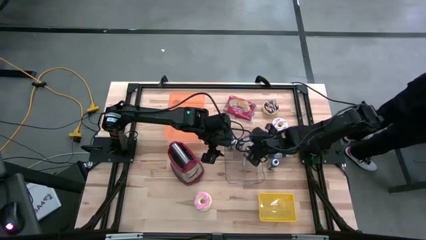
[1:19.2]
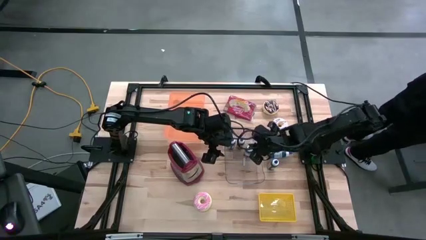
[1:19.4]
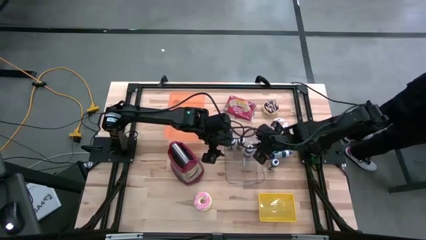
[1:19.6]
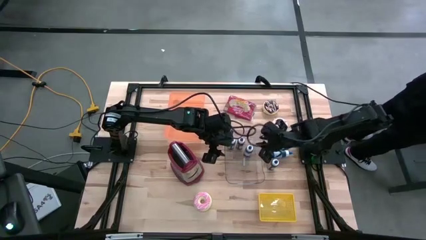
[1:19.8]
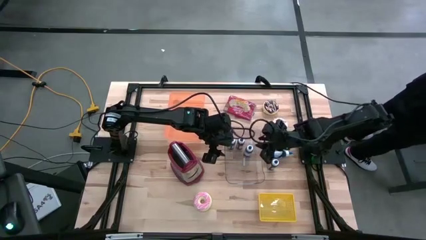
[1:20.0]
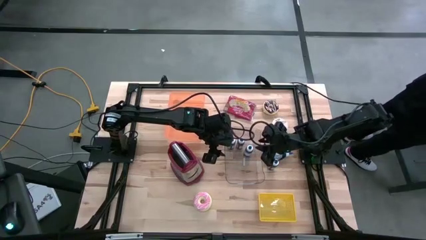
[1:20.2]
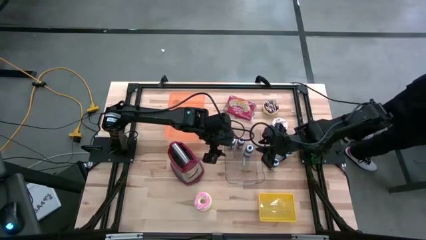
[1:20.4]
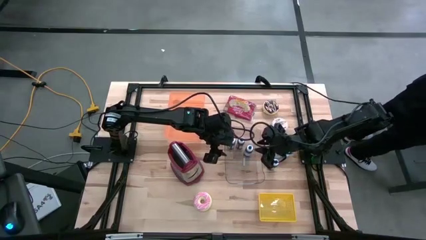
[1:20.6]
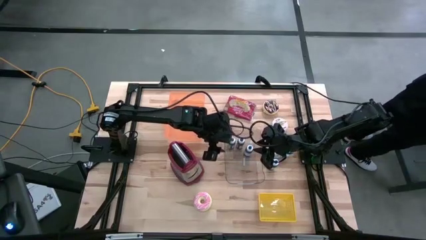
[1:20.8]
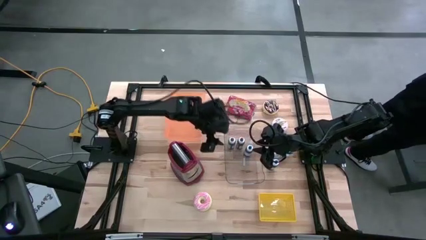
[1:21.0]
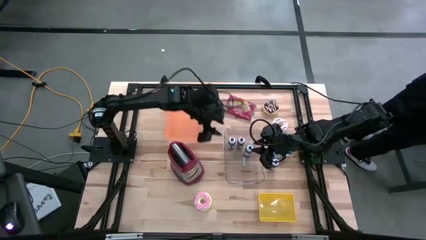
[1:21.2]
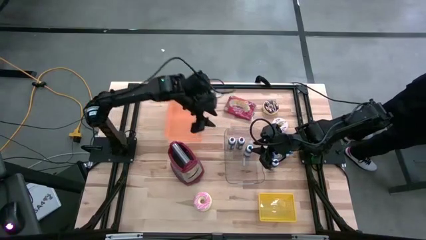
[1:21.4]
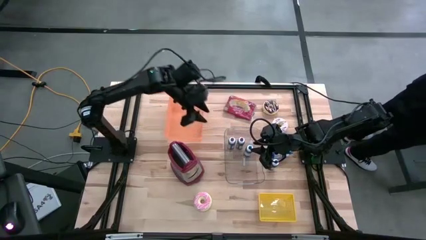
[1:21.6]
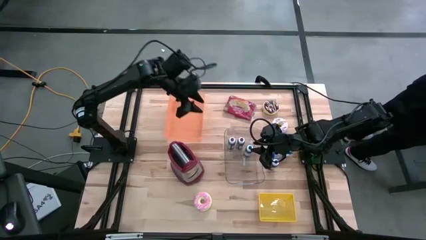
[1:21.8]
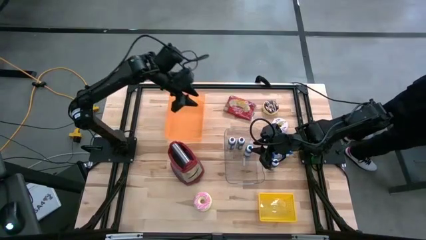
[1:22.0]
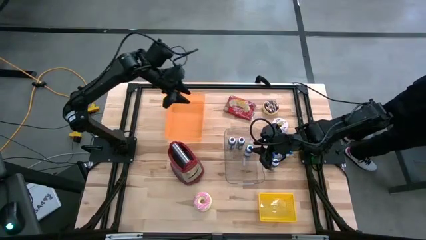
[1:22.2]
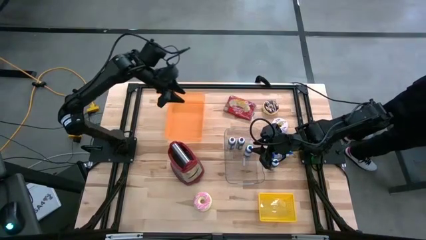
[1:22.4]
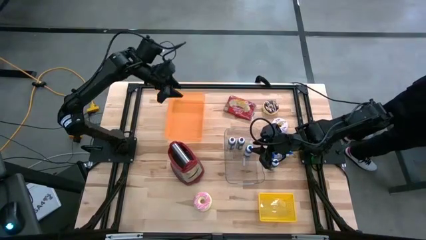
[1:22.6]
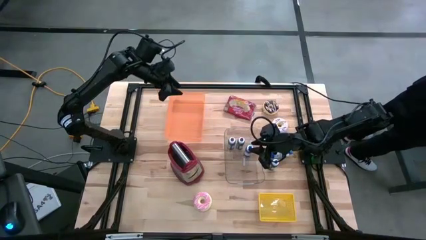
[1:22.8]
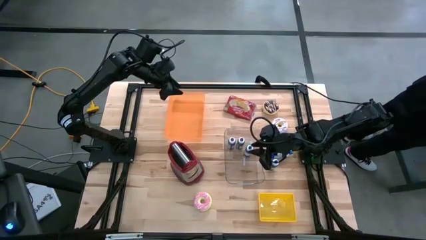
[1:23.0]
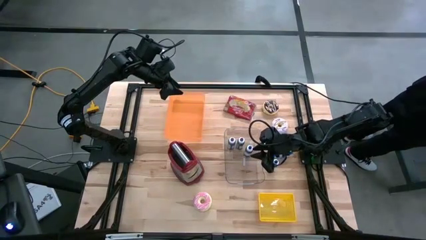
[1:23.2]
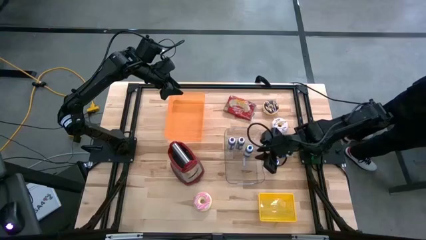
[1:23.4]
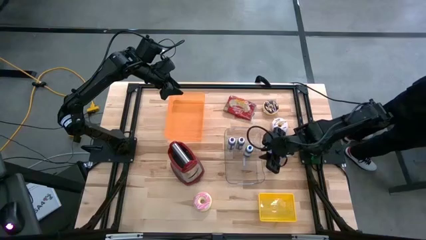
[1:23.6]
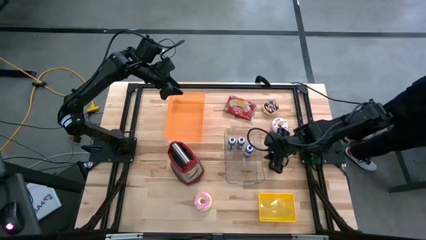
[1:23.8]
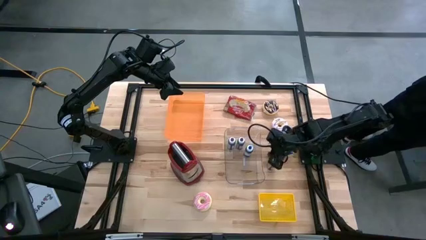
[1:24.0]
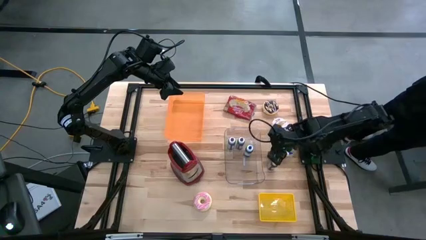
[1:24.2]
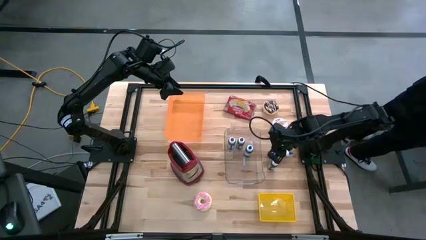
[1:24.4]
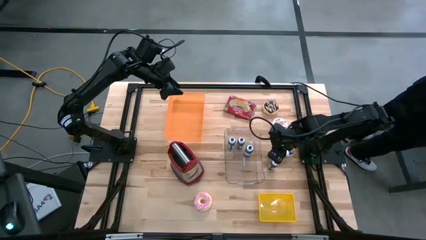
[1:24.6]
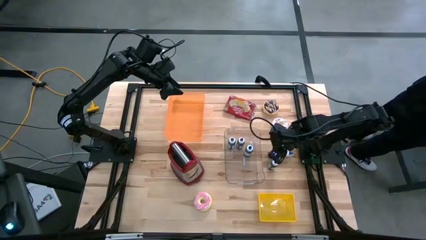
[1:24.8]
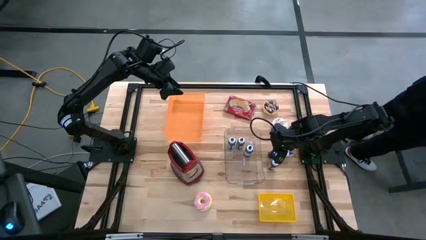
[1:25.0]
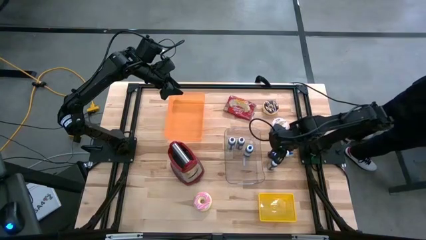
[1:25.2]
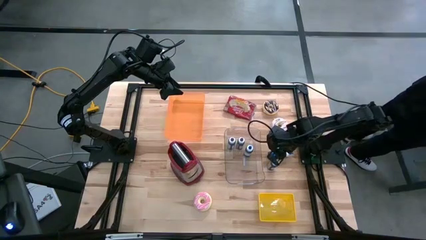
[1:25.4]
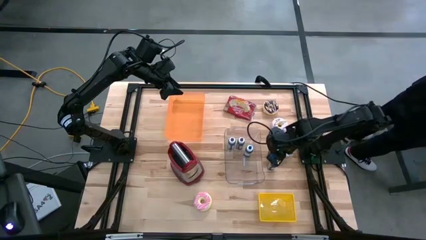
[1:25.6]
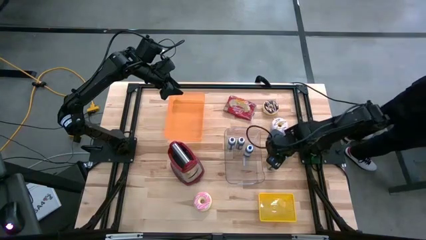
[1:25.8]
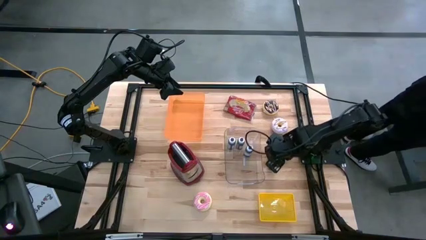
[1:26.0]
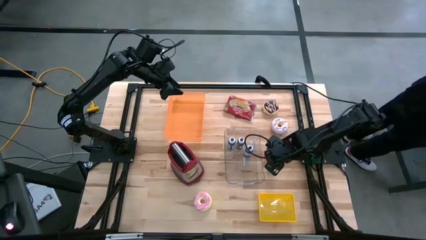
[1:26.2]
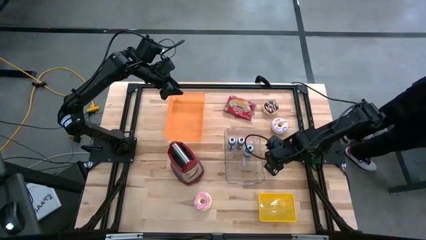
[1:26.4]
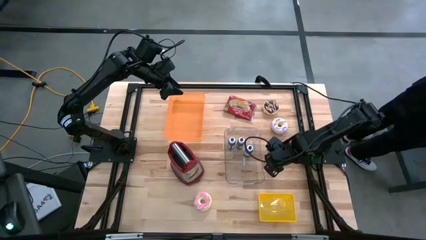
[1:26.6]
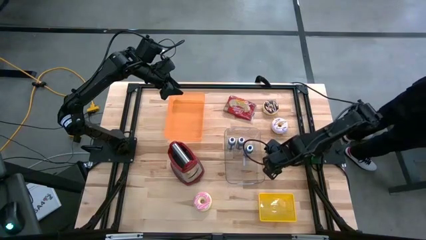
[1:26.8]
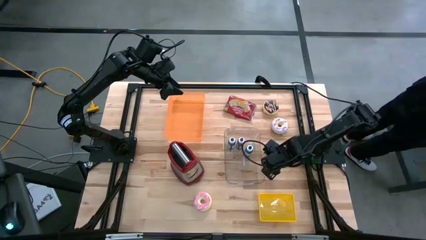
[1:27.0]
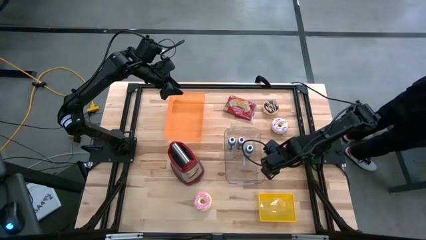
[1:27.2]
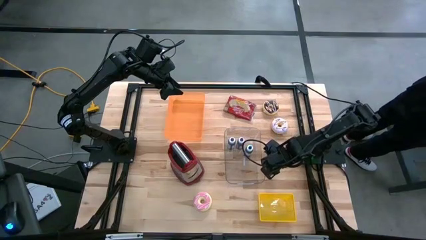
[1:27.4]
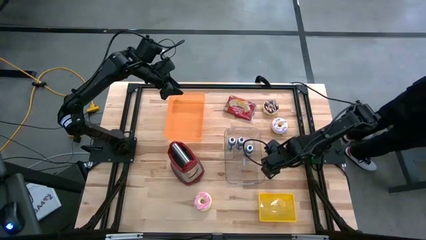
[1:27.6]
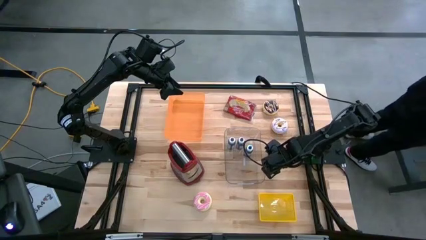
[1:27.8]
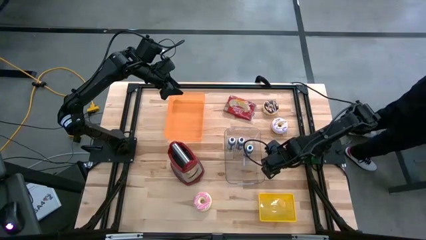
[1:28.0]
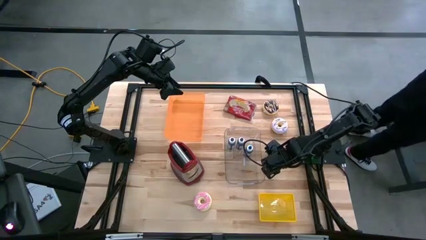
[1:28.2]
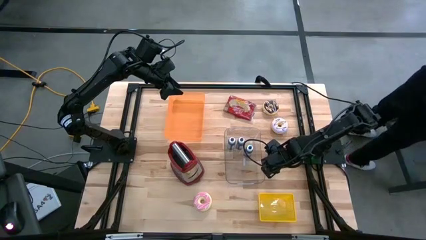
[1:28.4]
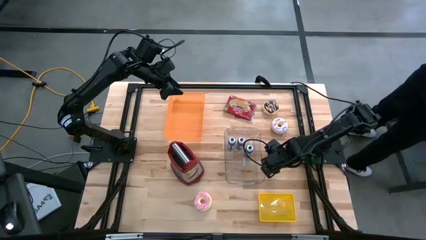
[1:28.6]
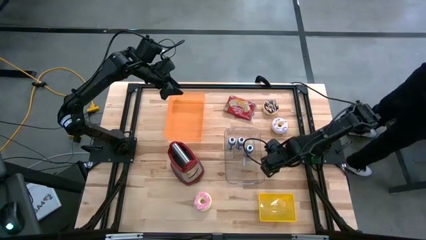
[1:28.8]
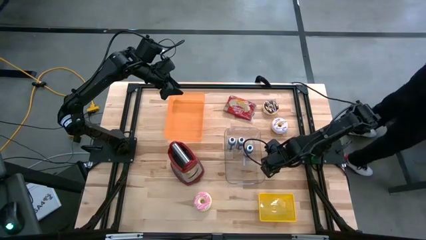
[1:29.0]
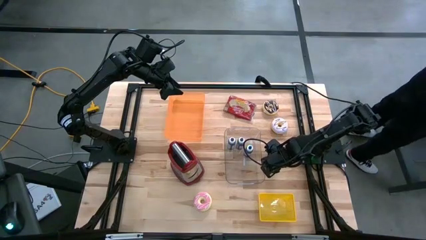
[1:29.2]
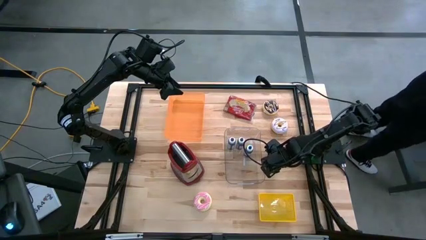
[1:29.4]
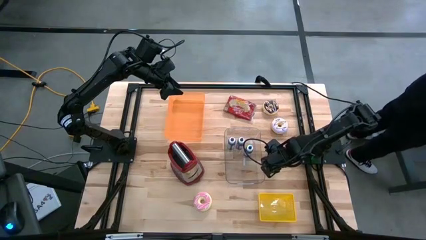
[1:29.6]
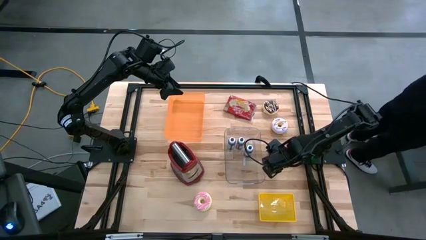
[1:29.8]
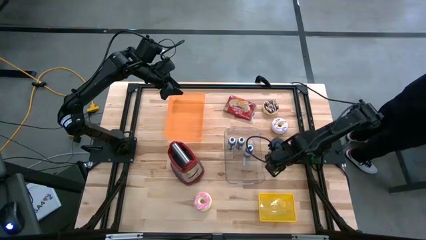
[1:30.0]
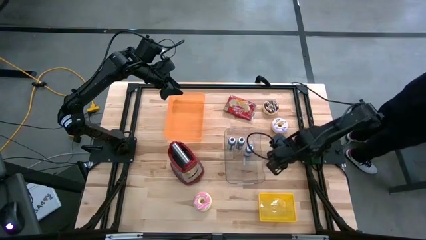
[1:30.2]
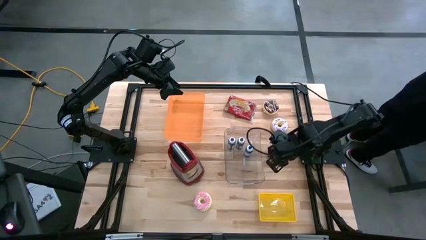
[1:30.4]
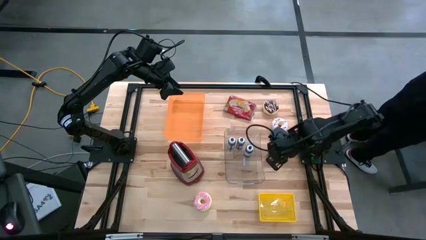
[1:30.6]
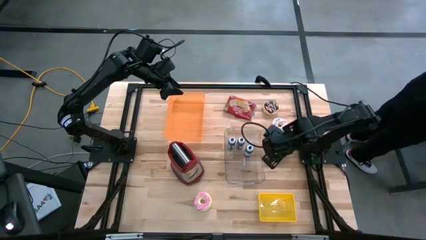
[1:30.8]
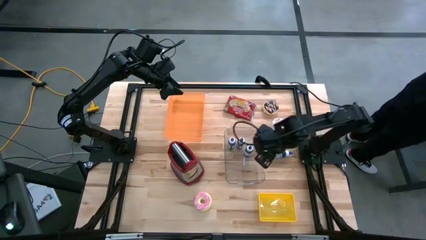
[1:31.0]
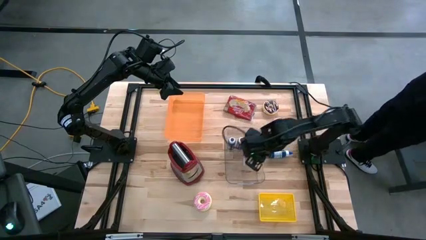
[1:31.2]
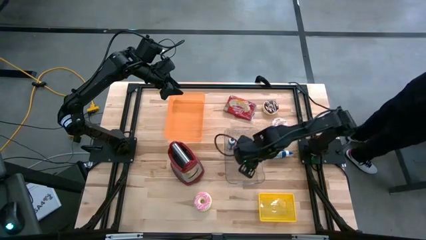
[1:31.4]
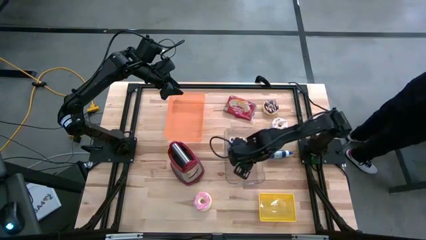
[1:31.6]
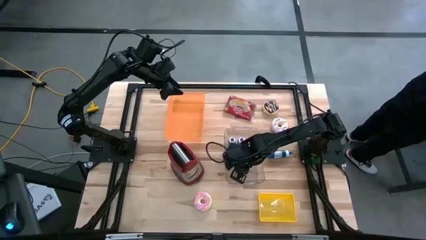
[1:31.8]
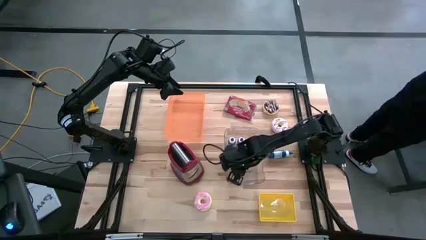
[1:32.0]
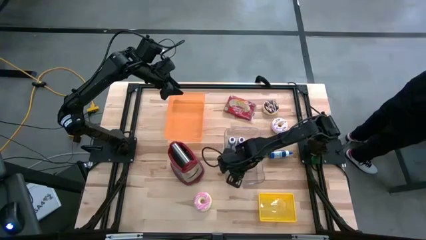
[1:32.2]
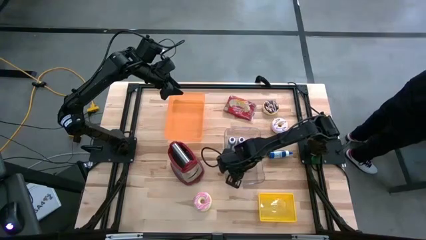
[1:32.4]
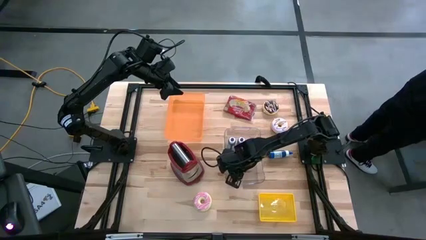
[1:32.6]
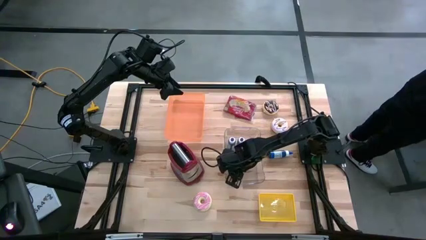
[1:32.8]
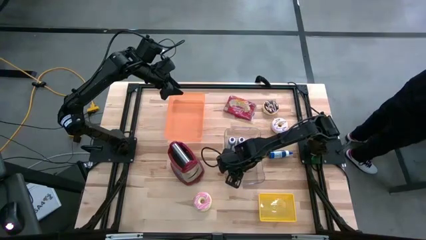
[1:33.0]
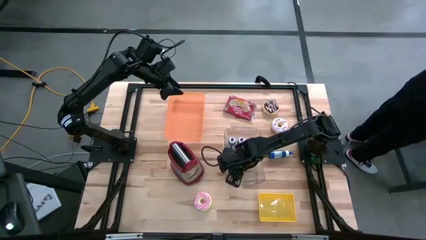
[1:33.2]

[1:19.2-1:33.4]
Task: Pick & Place Food Item
Put the bottom blue food coloring bottle into the transparent bin
